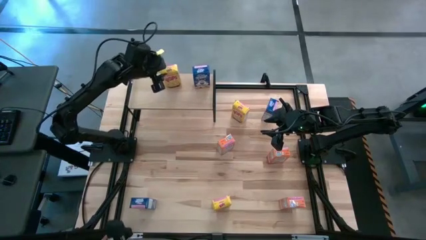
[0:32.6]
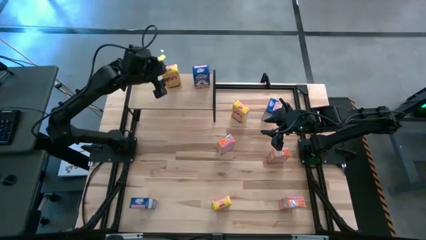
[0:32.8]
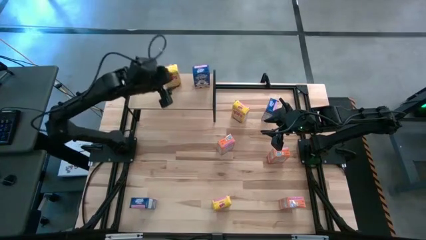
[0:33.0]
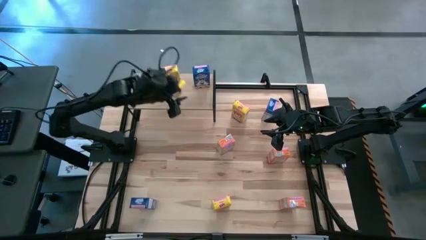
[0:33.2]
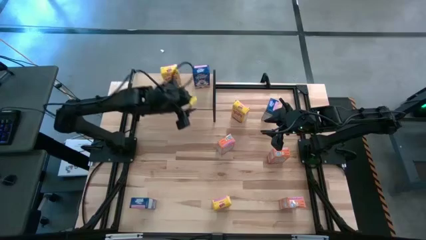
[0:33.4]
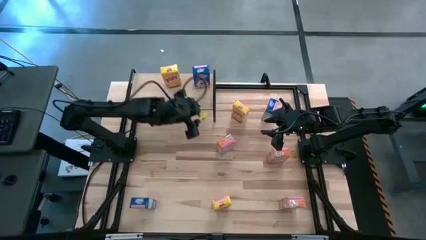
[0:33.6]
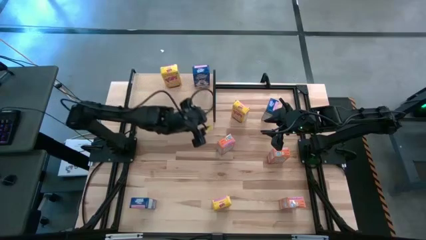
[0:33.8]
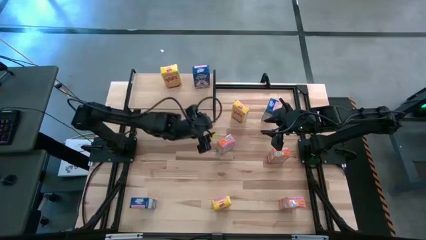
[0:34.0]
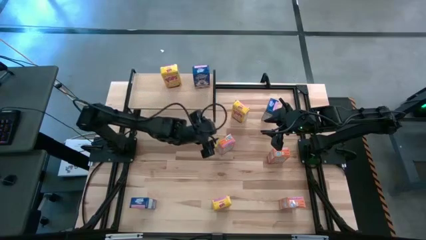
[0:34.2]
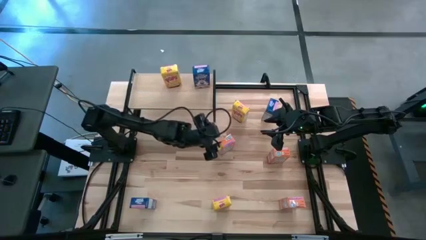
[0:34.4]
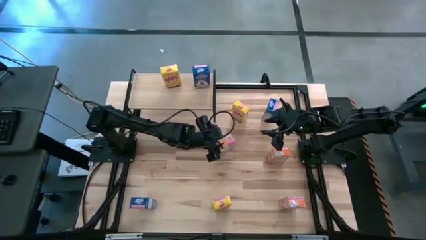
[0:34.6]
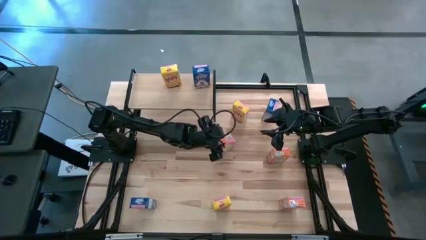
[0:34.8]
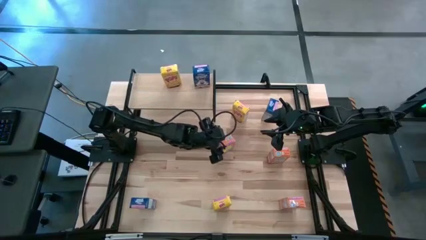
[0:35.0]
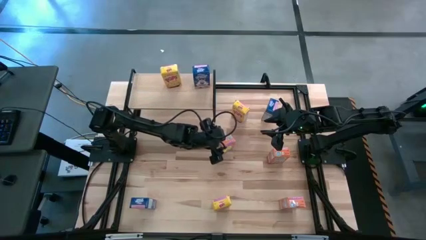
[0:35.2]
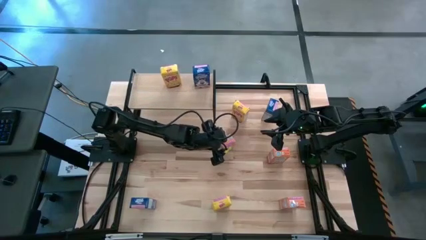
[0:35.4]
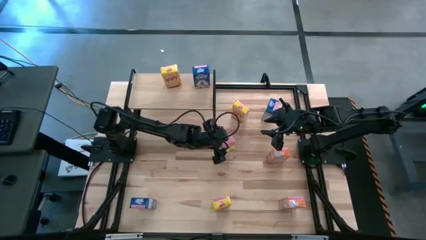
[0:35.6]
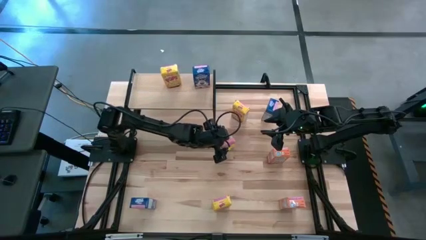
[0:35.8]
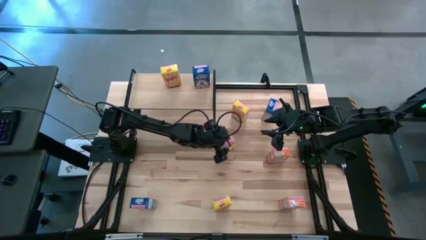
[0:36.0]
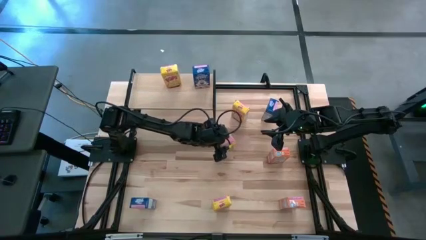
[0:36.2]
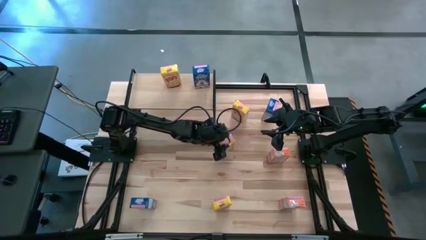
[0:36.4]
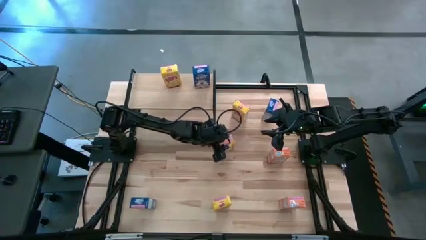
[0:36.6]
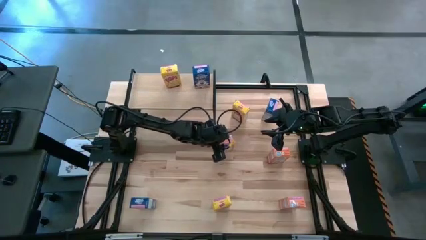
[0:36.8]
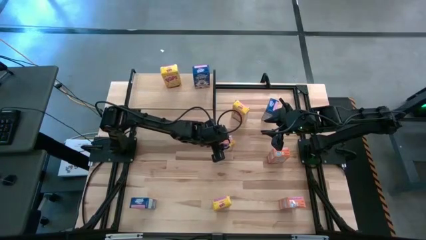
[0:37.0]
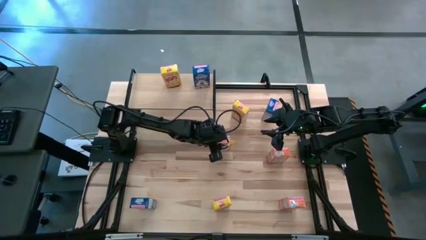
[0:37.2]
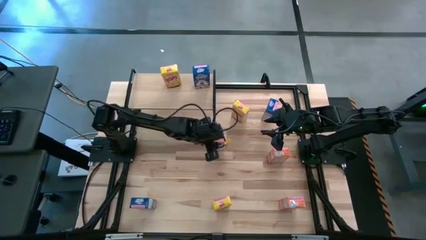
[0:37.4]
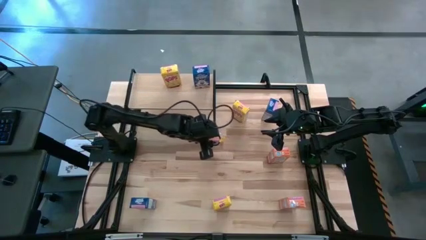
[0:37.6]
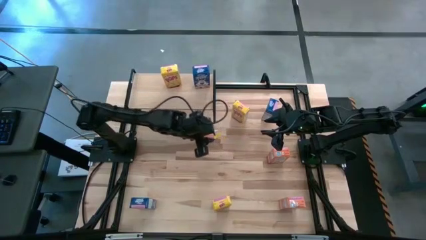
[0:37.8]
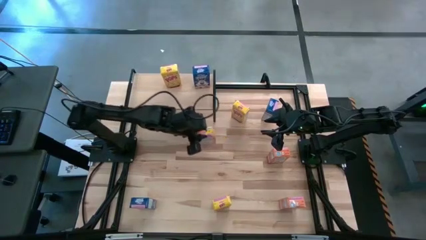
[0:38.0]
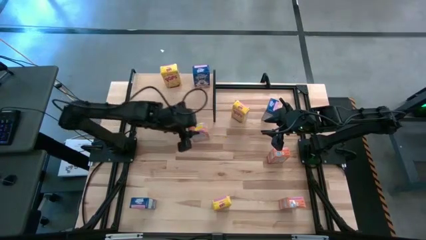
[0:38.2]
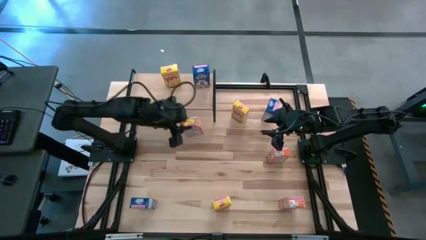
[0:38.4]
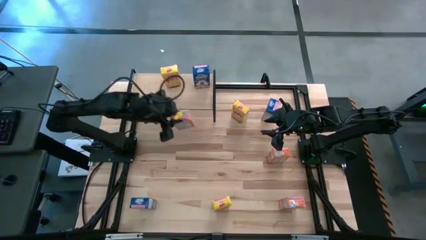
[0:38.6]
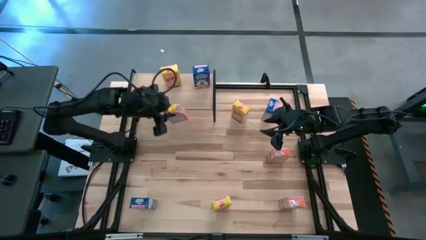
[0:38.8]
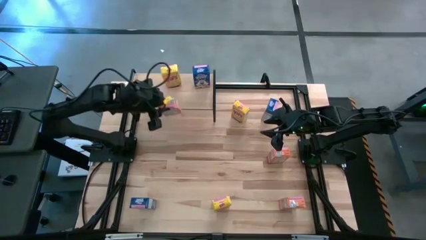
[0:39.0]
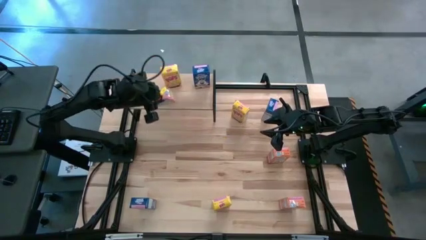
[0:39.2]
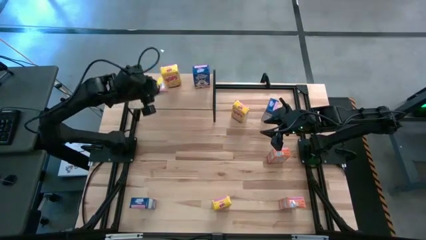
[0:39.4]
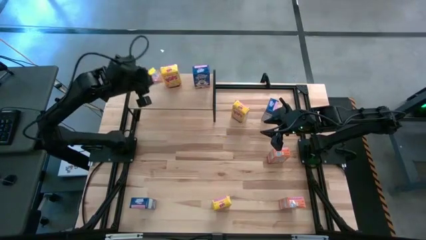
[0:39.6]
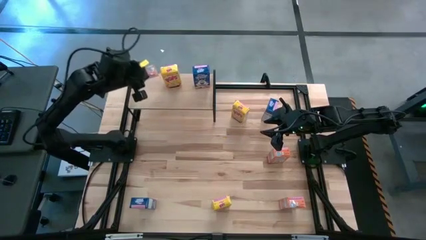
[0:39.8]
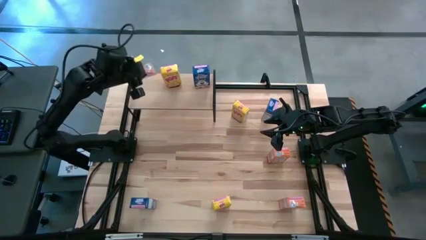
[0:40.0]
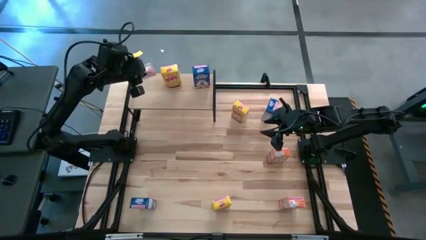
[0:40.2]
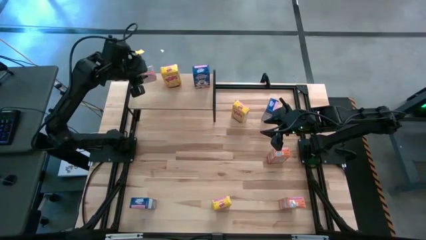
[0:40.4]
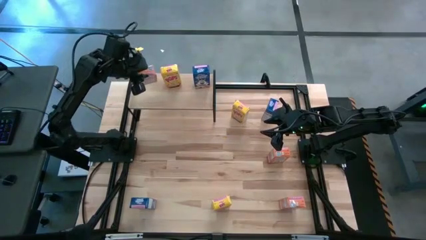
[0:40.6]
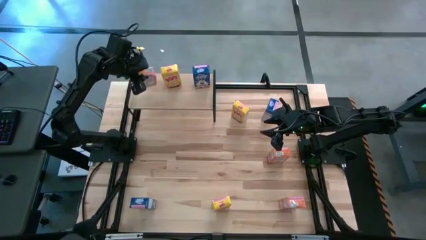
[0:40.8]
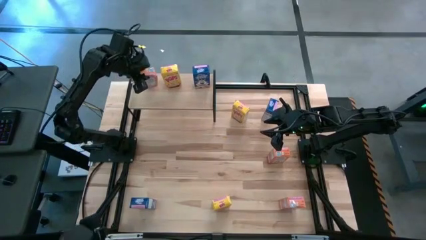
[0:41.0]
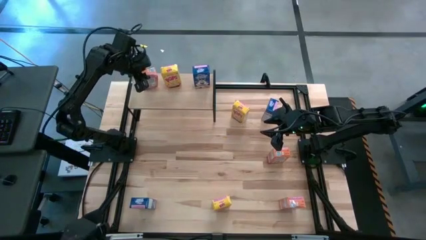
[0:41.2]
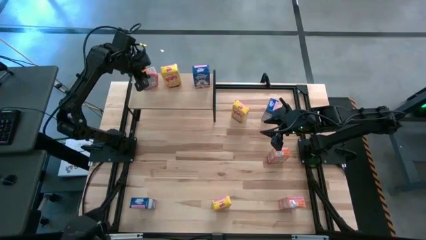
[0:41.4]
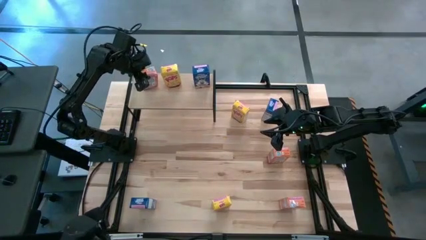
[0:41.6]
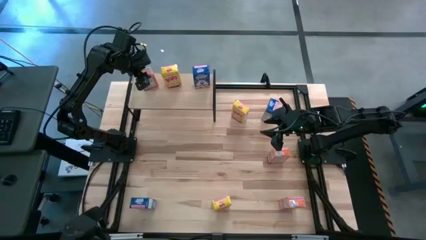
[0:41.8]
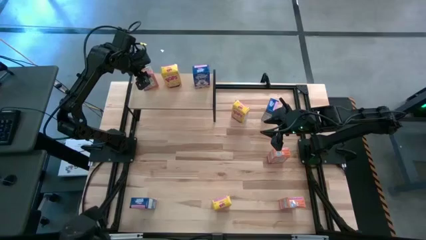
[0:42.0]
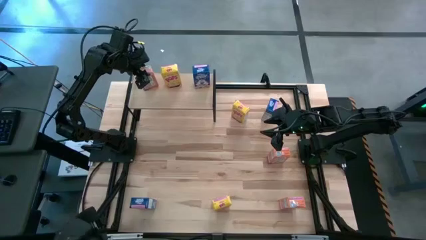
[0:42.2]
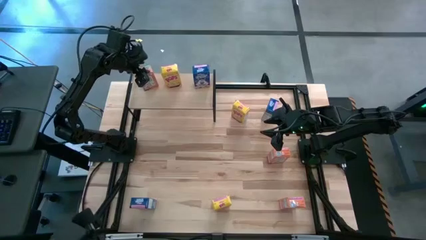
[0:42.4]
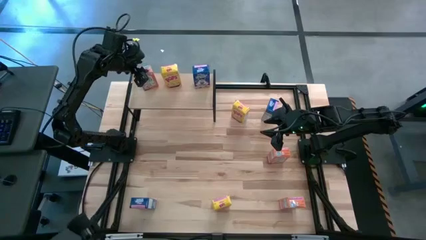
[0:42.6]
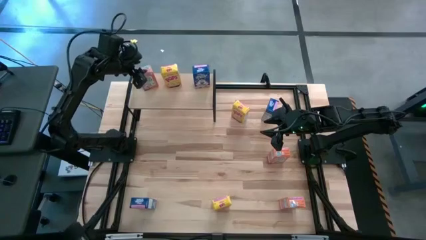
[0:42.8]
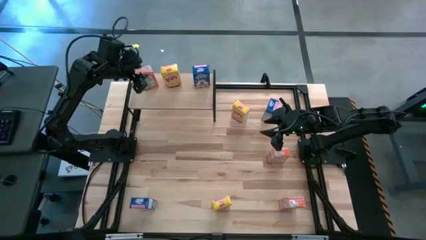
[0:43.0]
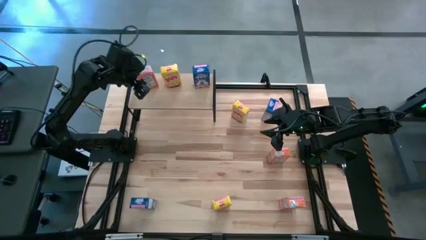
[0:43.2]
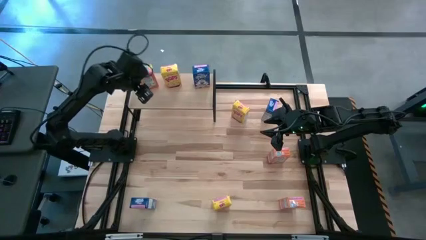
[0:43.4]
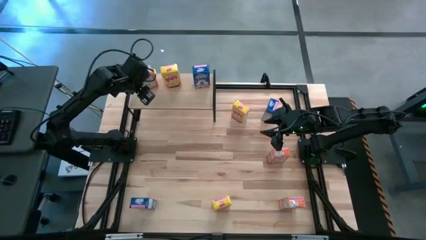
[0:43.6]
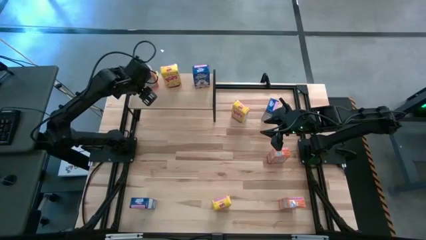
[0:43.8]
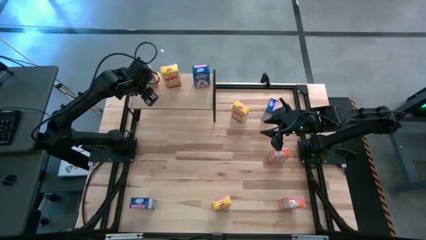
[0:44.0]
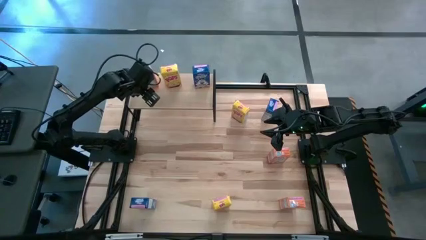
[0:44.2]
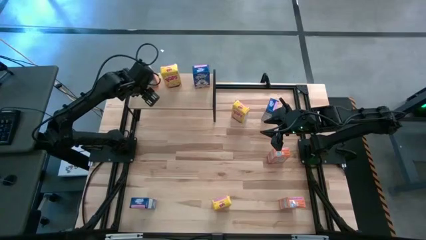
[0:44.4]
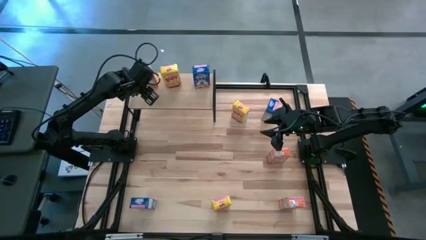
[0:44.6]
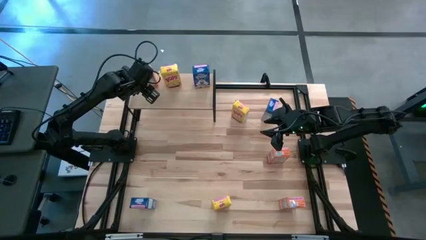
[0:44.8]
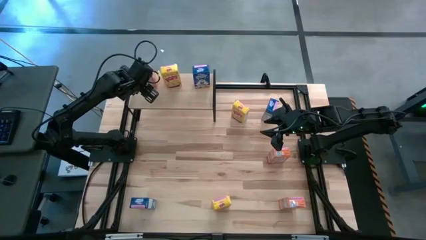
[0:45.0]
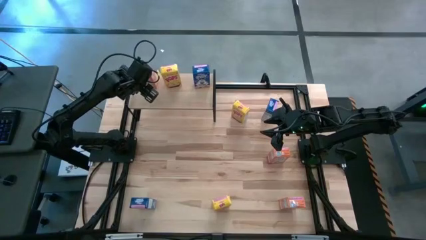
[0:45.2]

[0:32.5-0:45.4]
Task: Stack cereal on shelf
Put the top left orange cereal box on the shelf
